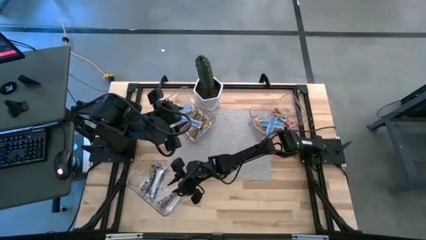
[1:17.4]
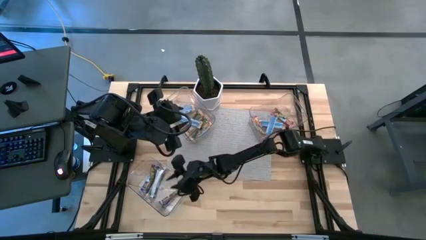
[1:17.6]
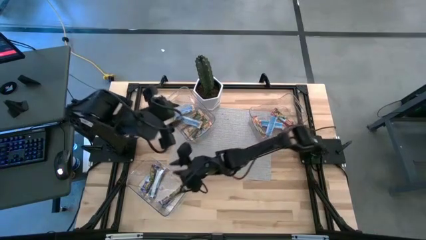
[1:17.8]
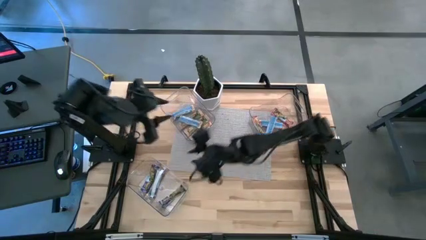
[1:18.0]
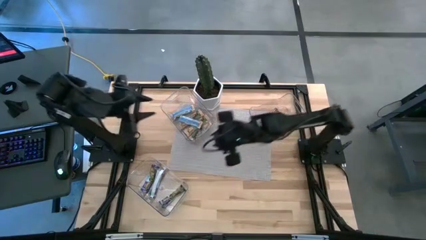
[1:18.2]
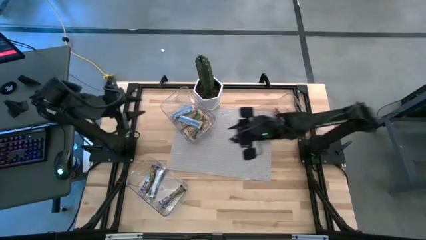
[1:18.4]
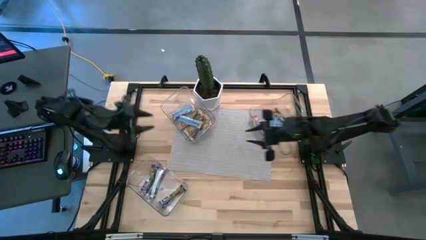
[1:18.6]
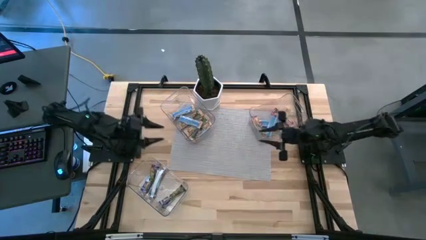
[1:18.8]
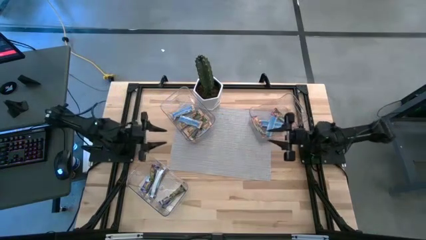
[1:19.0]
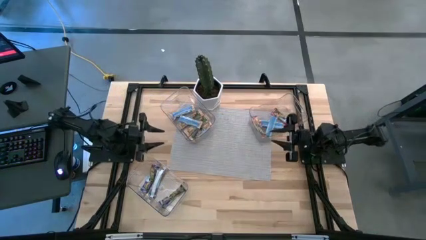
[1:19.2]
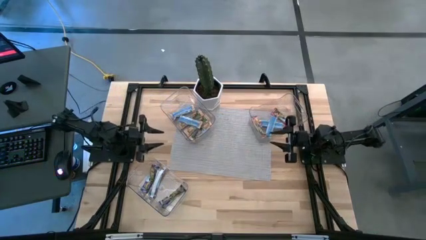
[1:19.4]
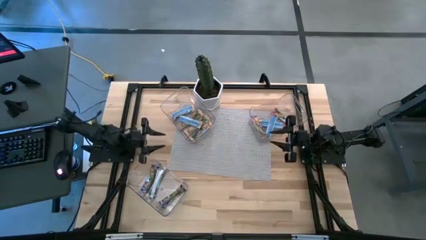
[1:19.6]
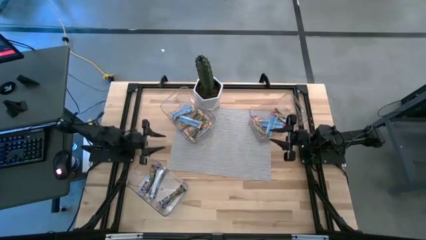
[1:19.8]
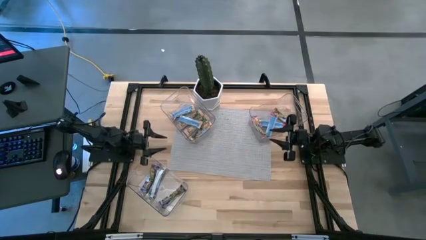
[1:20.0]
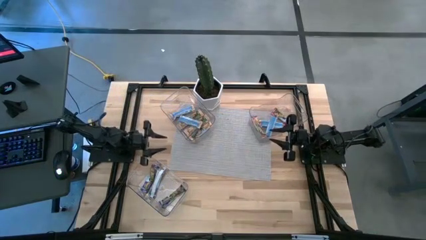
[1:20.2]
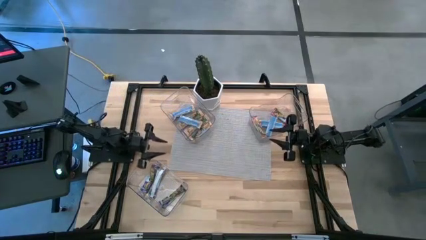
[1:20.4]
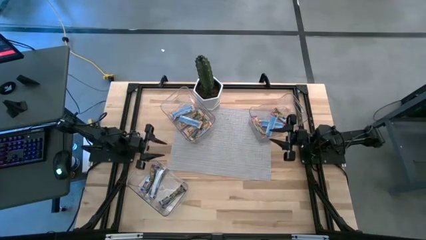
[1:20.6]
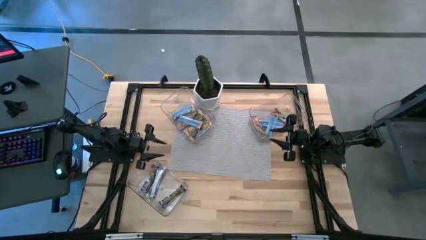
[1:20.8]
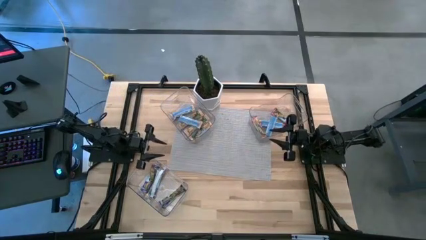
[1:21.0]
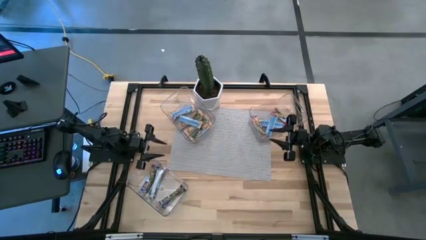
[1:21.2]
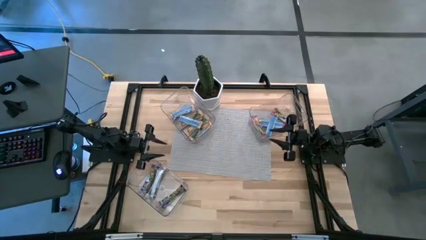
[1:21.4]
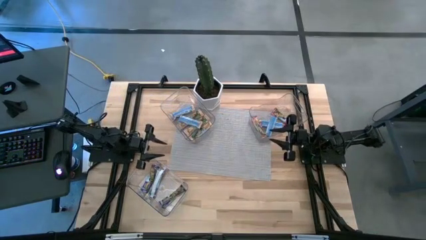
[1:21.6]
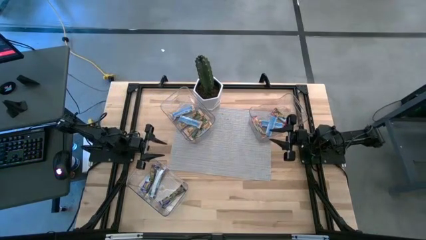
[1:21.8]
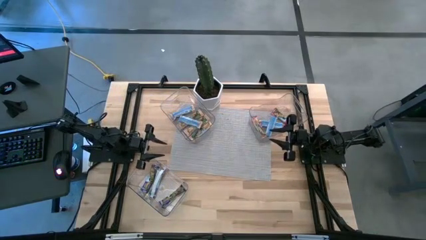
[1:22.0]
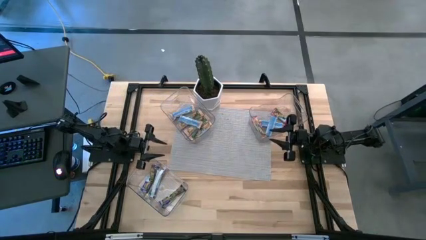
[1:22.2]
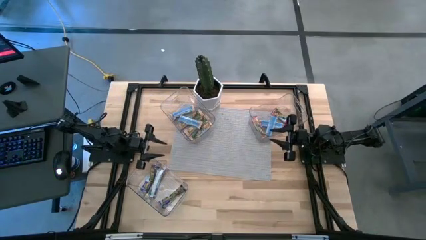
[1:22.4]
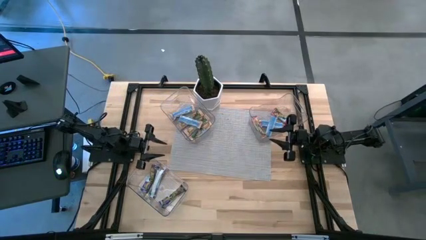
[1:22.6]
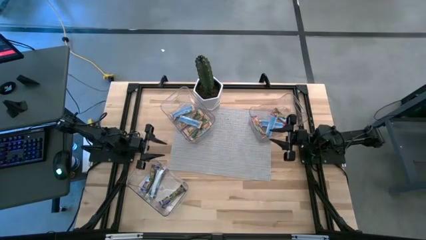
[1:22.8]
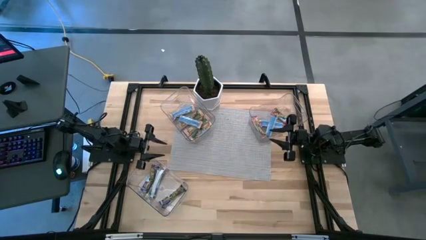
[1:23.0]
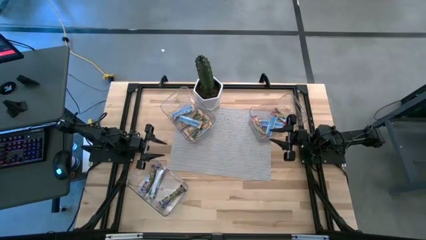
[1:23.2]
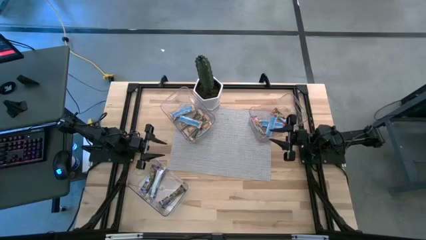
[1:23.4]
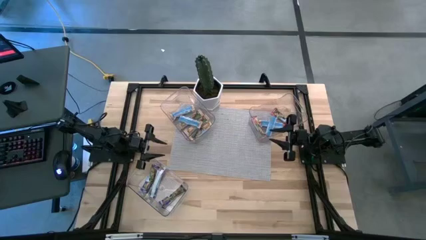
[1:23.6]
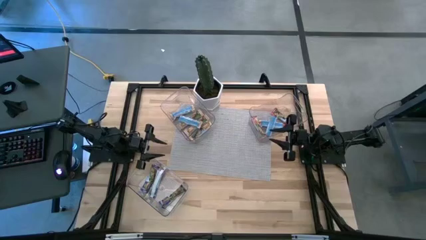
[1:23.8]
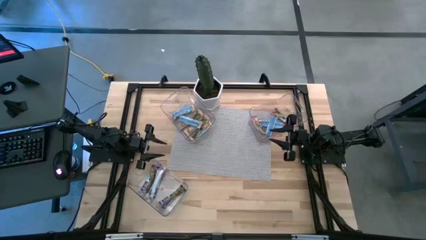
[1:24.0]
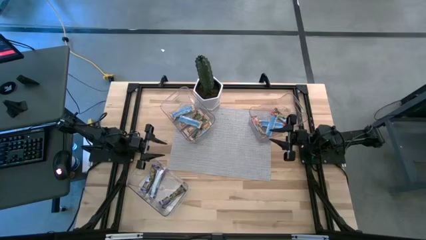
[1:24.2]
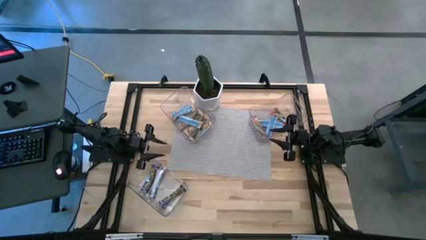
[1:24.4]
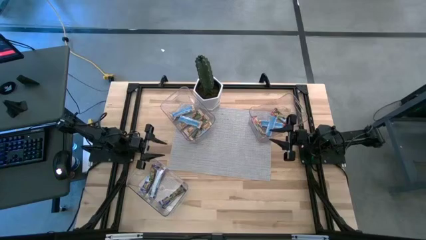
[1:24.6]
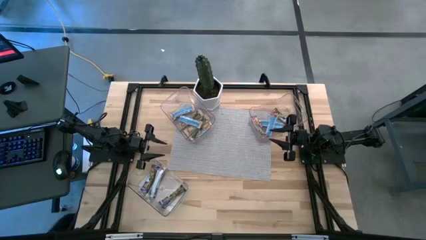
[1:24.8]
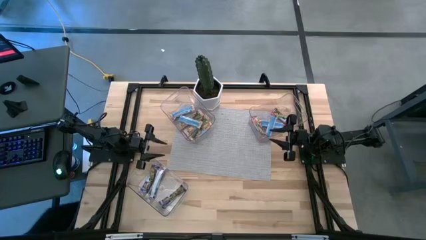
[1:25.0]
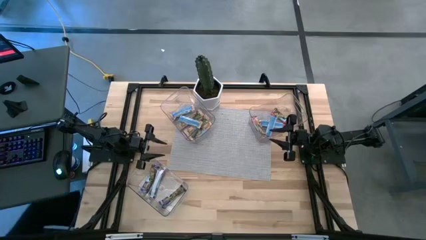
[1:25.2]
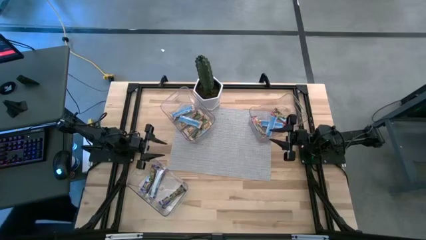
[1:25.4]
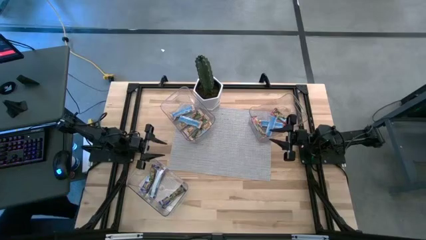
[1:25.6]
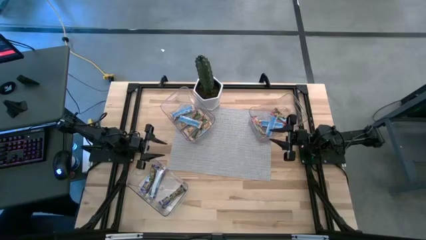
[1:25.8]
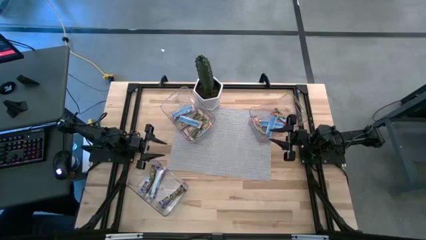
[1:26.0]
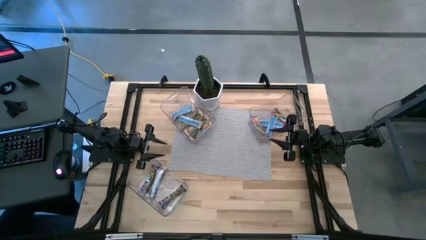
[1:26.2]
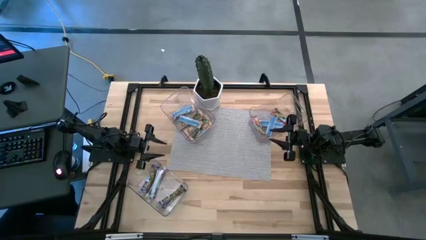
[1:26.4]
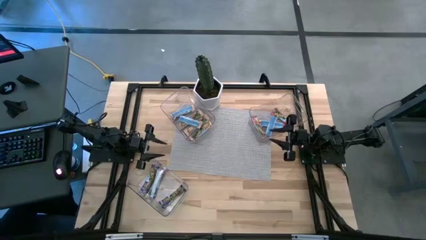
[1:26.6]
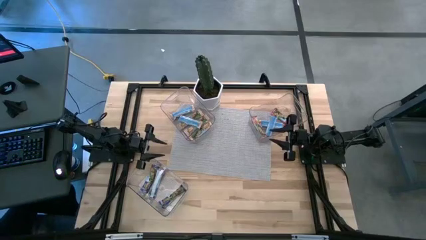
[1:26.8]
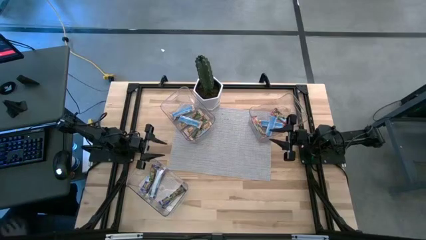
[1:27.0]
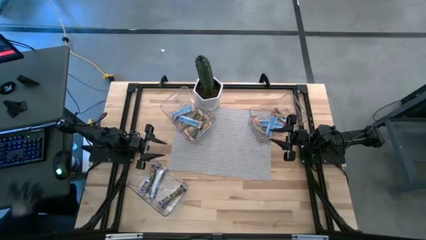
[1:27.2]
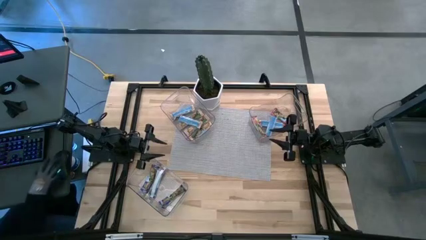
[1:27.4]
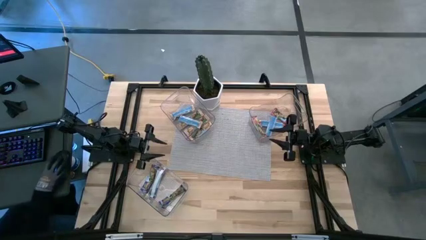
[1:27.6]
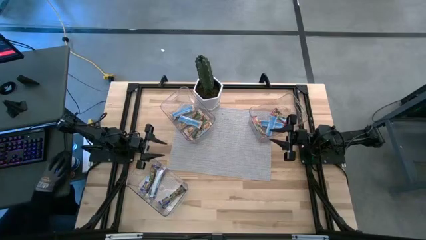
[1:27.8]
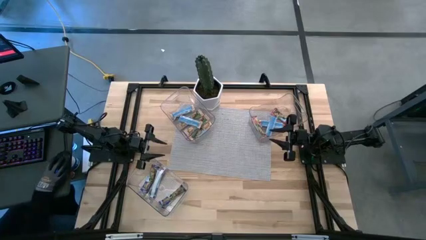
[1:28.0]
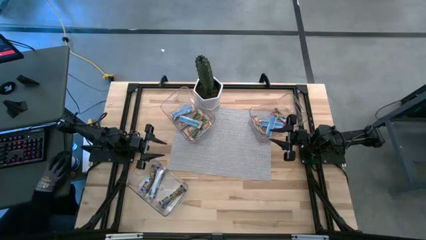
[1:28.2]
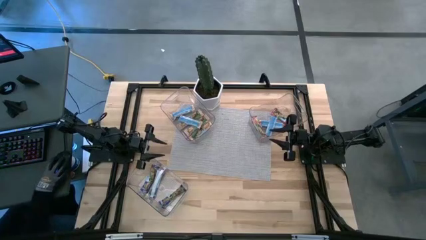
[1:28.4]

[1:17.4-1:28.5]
Task: Pick and place Granola Bars by type
Return to Home Position
